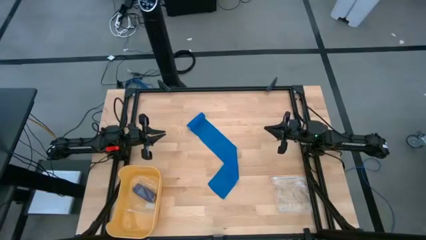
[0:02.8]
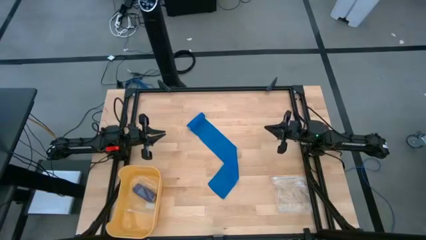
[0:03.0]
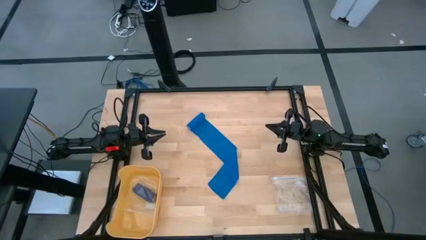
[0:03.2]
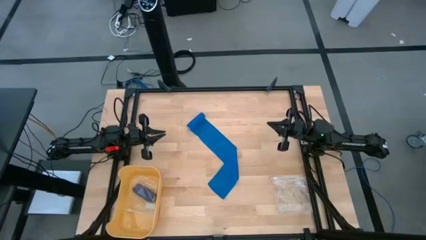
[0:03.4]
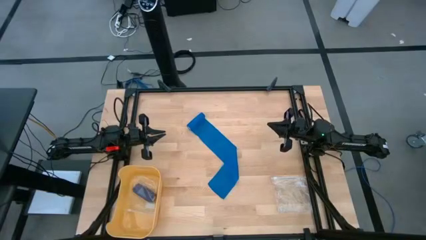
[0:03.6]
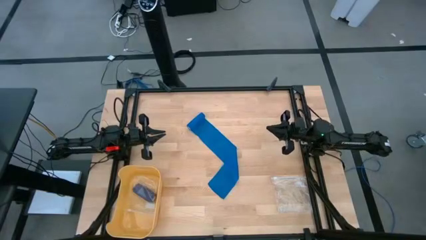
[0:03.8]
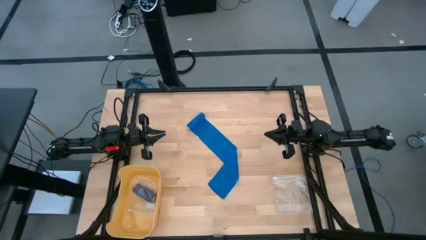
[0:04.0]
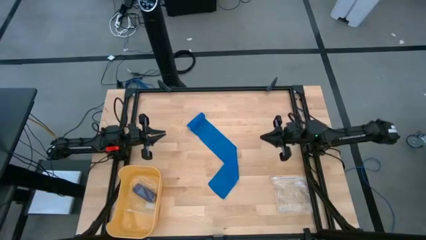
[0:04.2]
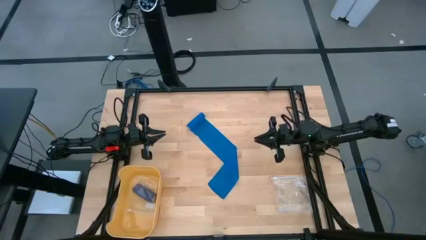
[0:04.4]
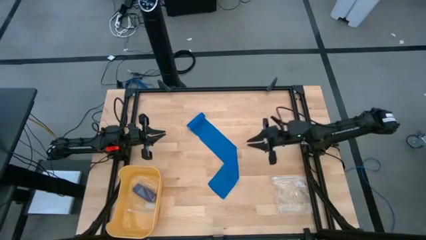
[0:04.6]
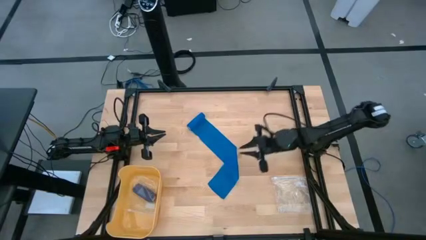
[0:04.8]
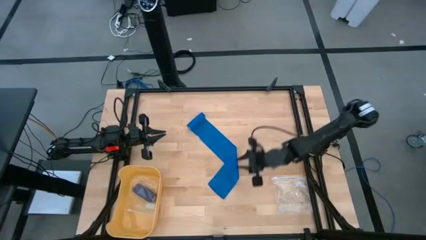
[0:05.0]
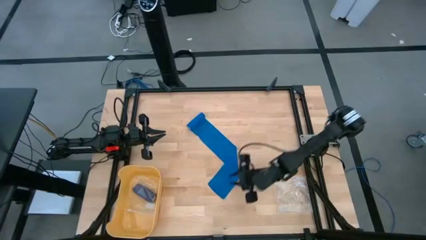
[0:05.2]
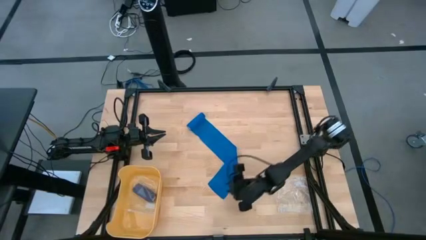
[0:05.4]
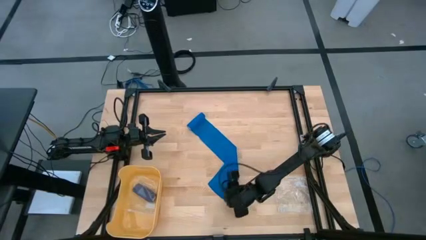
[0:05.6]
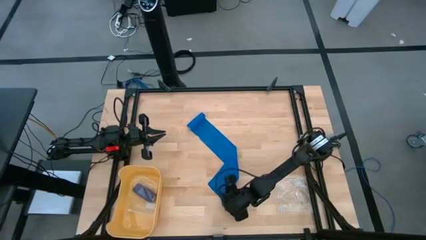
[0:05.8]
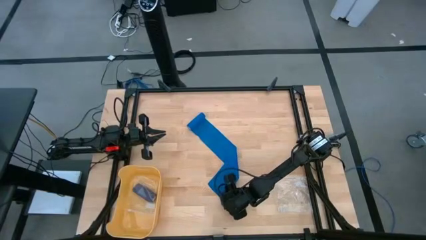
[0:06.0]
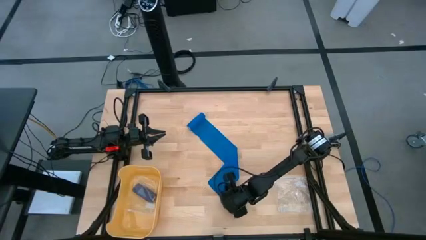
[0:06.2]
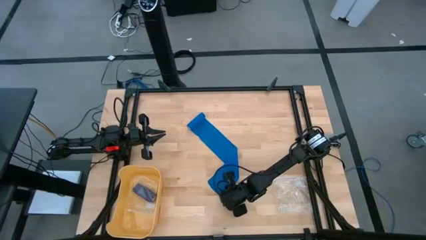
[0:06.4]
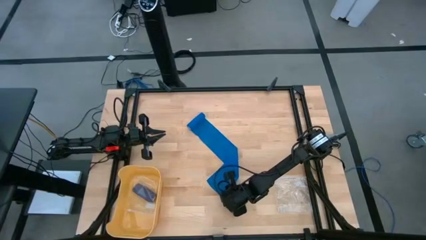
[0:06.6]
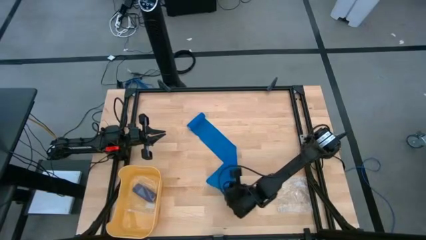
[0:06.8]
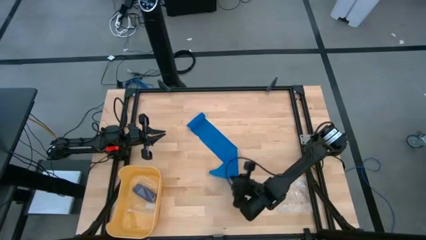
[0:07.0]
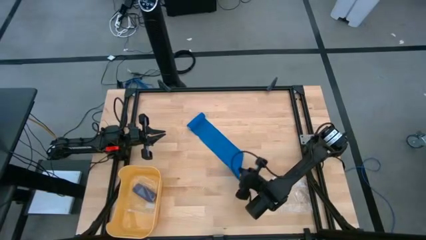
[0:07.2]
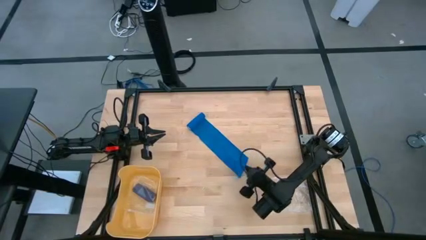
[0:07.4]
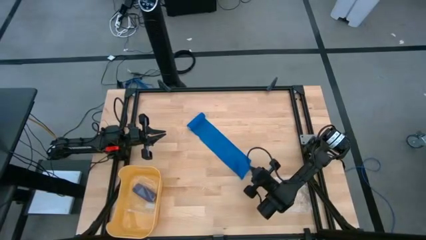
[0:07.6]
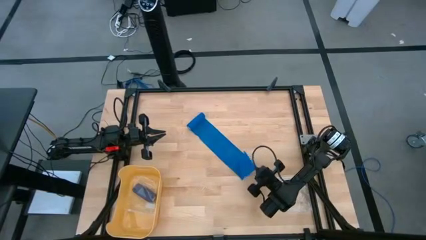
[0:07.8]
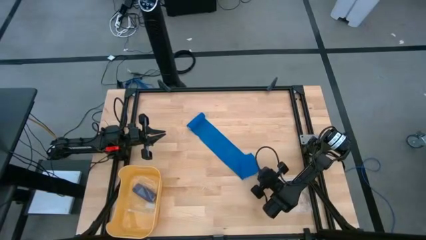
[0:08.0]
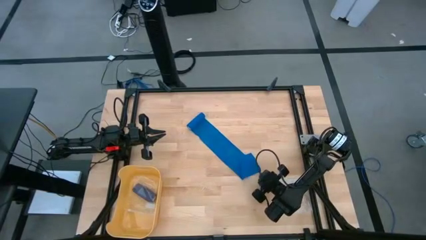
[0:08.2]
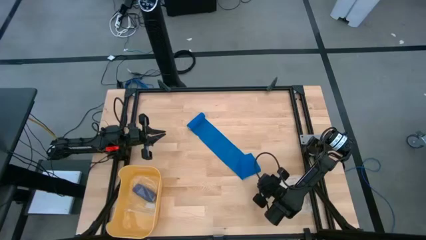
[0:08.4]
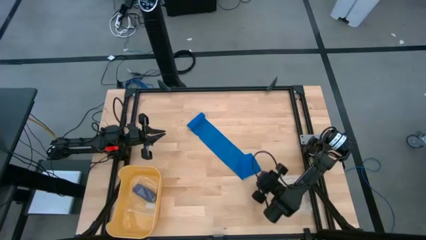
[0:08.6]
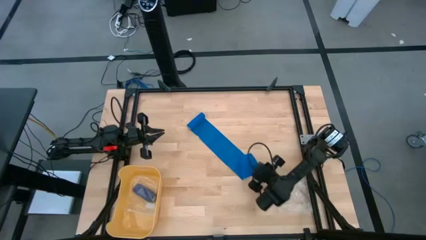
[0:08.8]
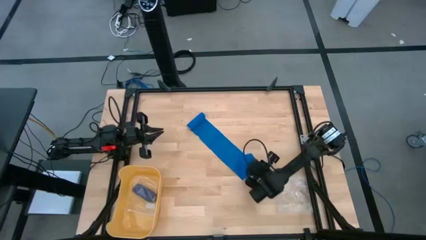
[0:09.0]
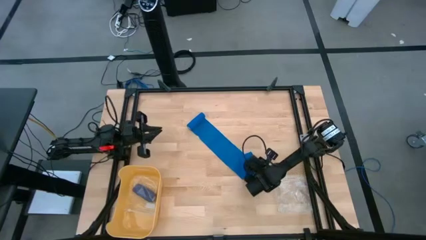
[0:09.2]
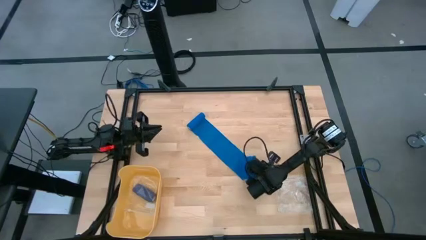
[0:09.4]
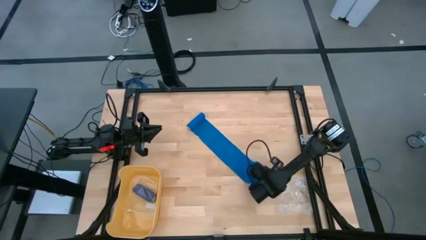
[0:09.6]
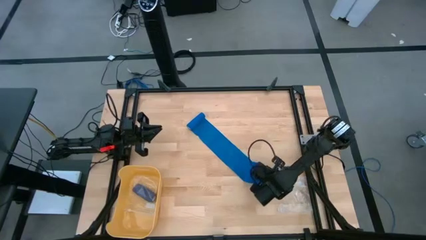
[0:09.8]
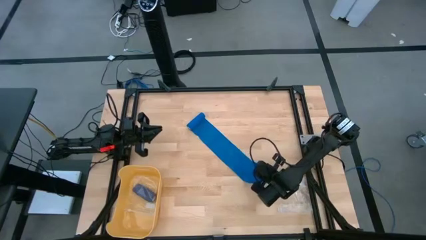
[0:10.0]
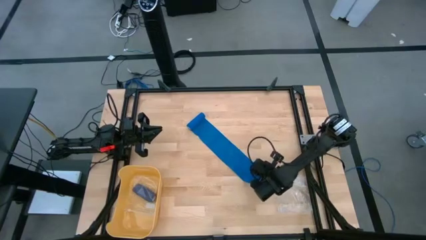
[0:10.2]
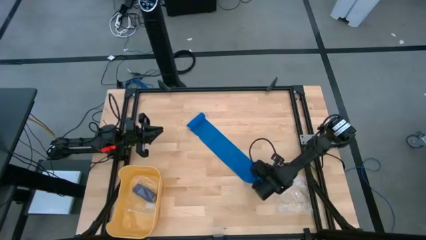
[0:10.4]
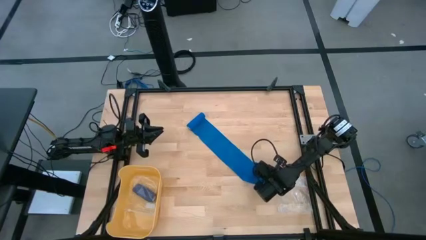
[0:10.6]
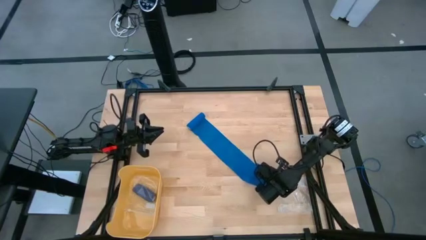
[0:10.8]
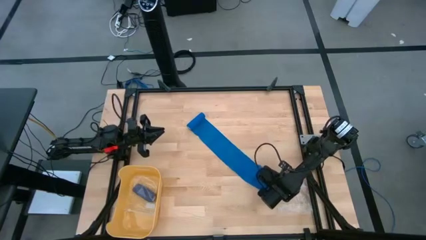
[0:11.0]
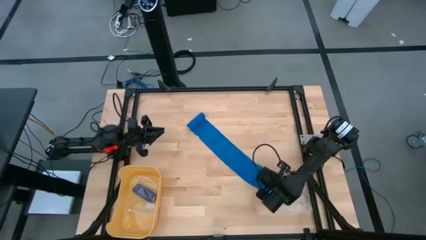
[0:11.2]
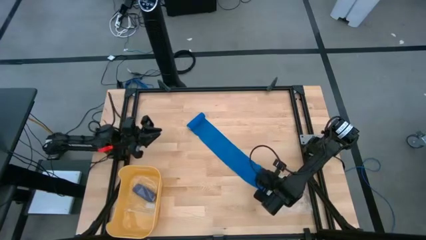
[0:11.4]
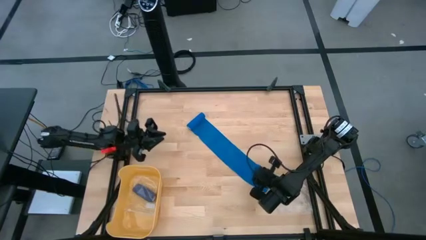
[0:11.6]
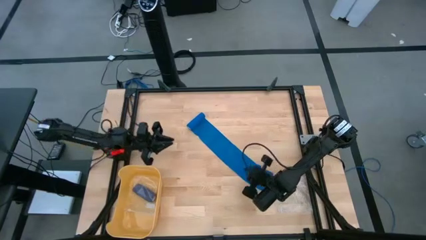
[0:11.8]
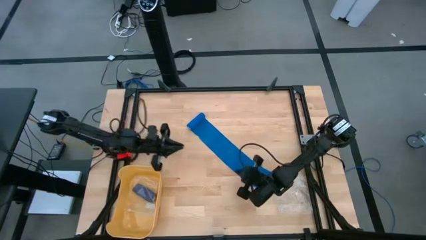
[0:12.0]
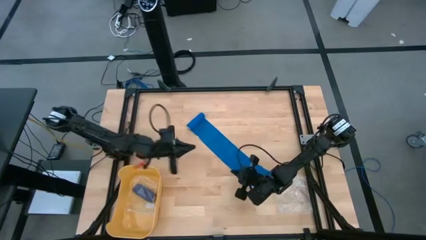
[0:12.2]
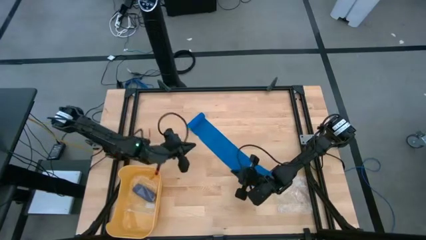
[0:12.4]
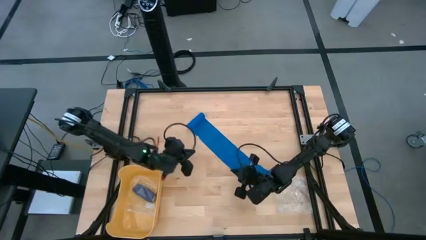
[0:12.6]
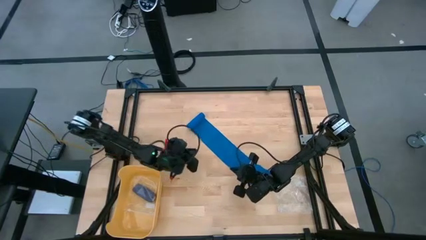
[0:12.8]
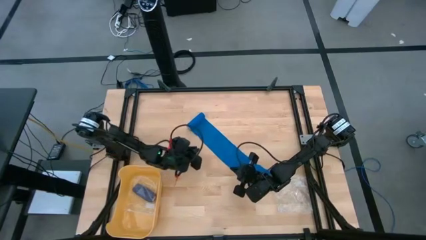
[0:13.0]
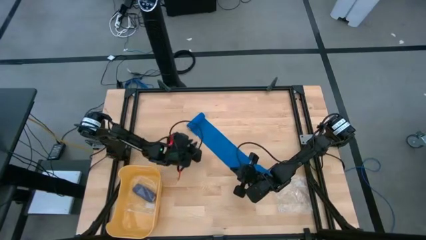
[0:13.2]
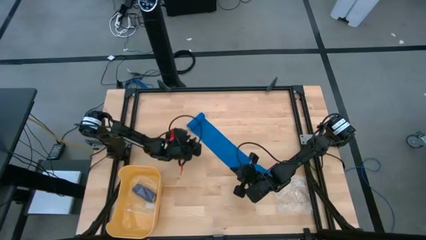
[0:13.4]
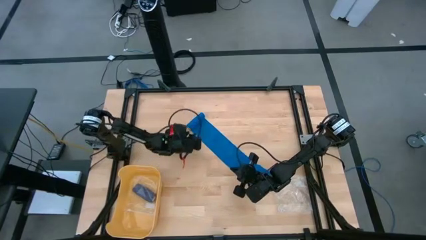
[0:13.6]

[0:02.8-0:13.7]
Task: Roll bandage
Roll the blue bandage

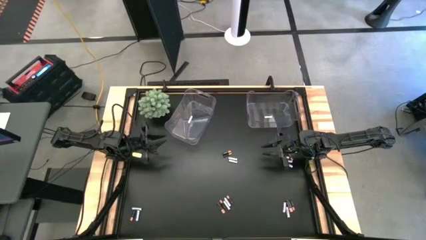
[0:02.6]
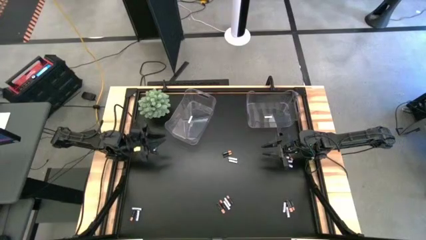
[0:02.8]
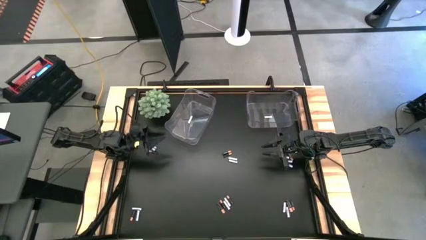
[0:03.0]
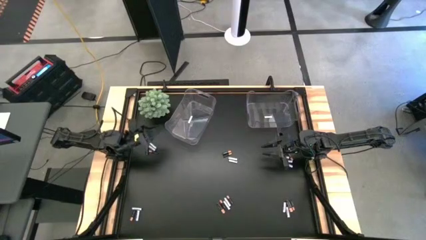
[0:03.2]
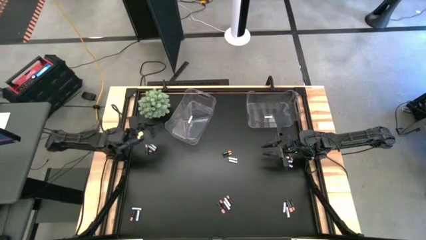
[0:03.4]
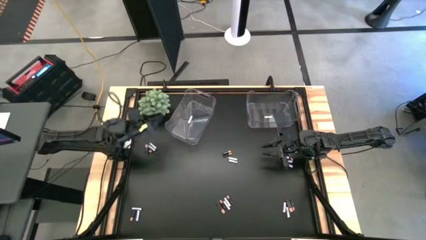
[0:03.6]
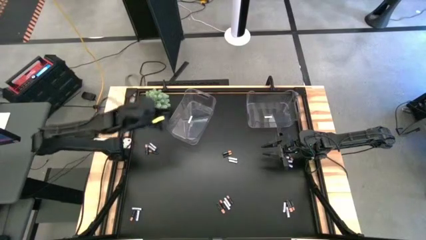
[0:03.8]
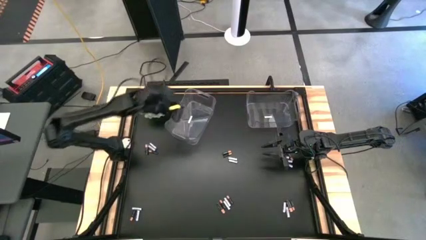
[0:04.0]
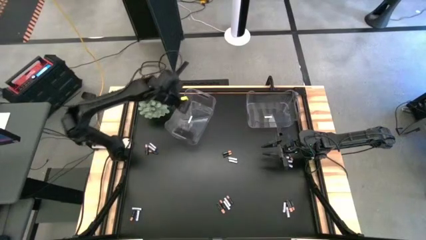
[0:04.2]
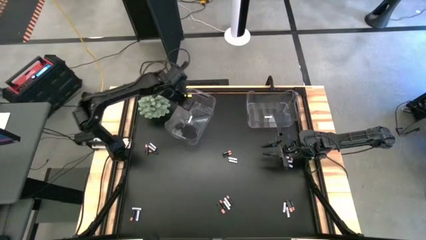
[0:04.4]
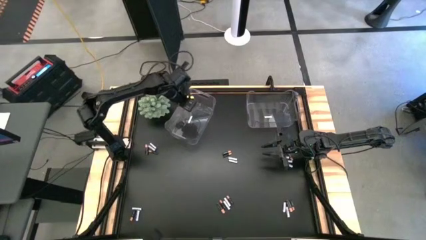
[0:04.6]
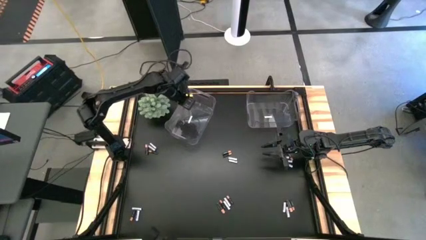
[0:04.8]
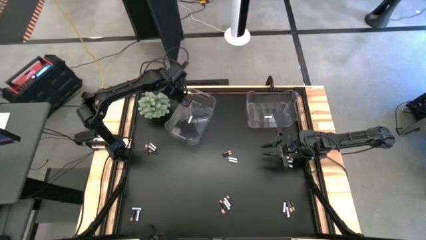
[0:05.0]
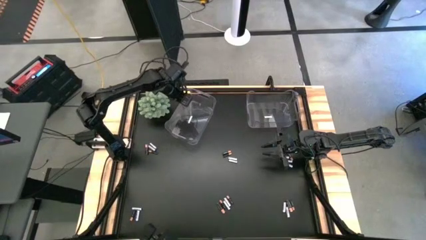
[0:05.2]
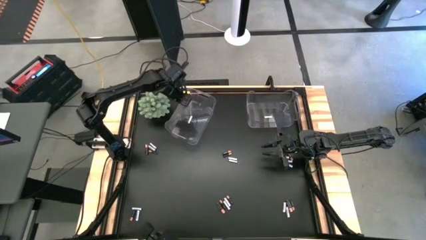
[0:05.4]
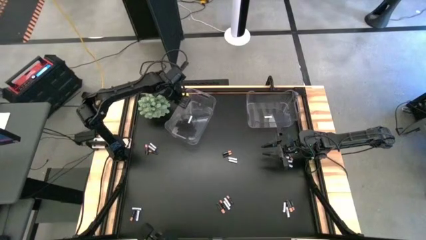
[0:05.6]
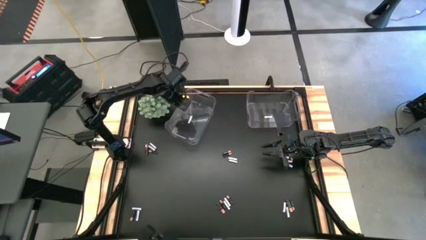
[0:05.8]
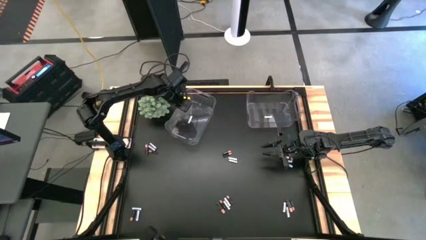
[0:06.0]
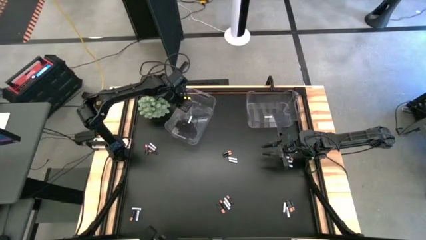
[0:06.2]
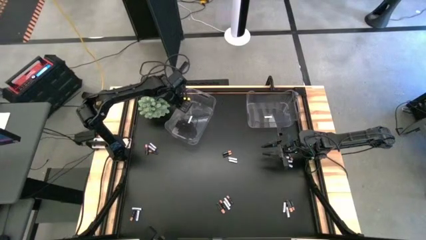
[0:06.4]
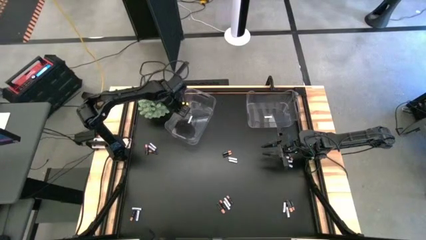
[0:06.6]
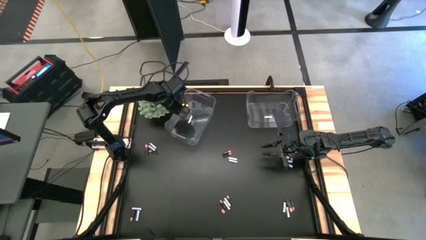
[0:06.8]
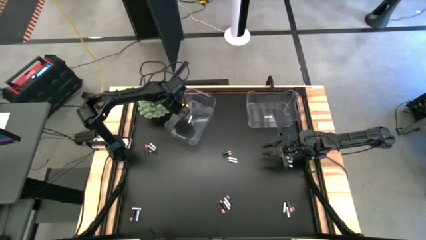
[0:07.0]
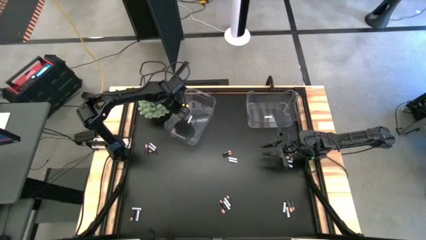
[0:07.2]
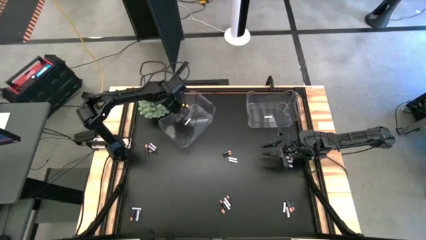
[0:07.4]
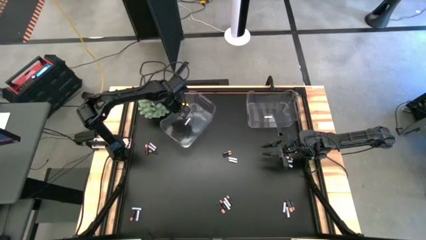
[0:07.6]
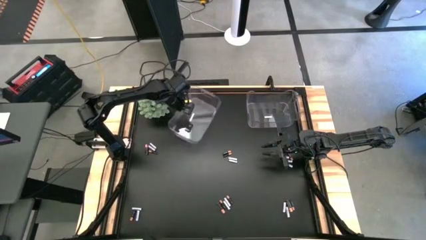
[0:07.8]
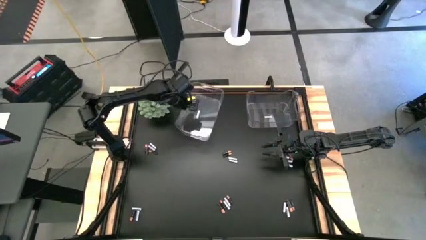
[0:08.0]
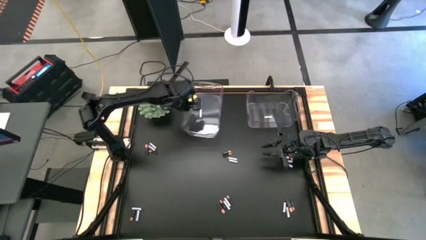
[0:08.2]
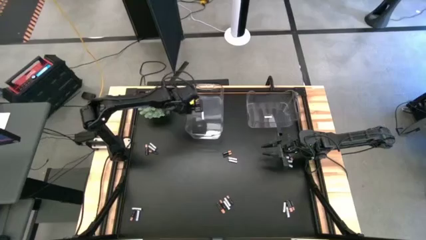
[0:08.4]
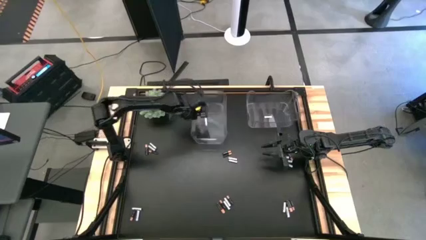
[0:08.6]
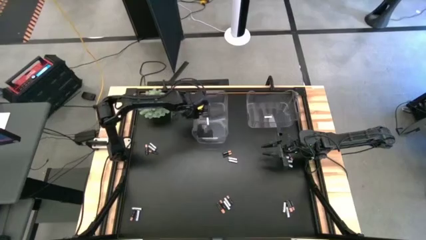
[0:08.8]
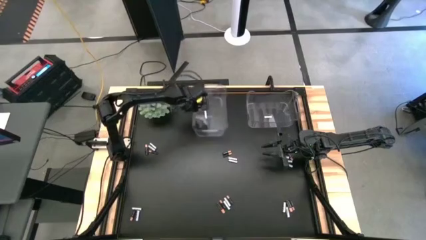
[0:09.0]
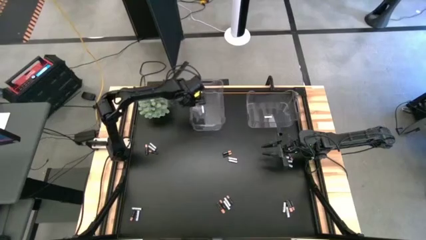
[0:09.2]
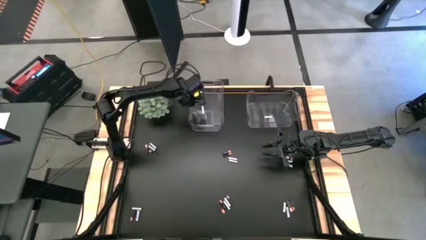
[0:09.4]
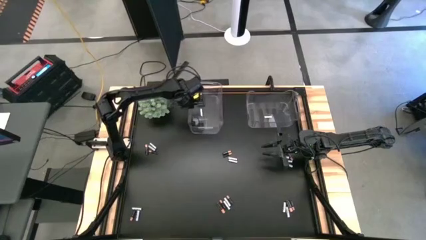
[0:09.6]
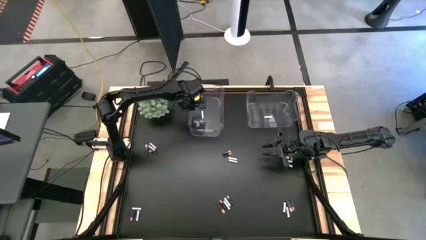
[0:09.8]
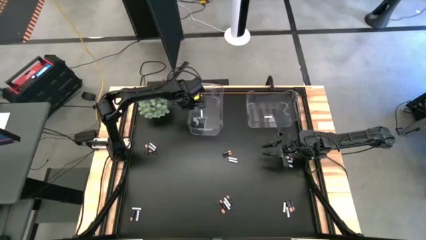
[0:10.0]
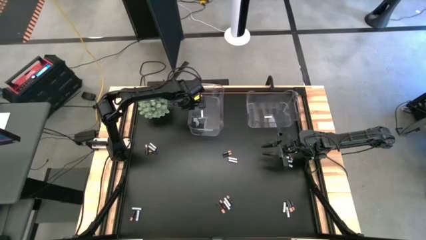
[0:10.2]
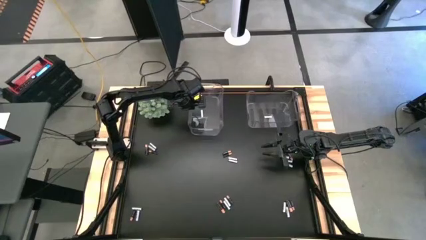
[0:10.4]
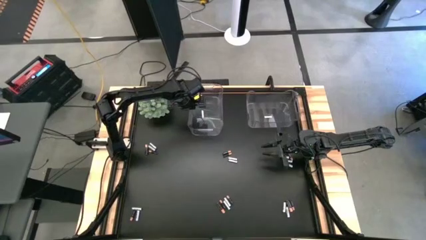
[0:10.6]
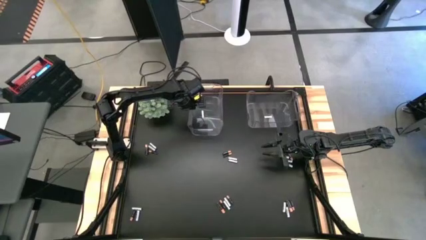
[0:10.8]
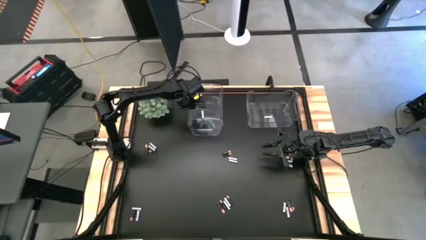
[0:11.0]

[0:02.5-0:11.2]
Task: Sort batteries
Adjust the left transparent bin
